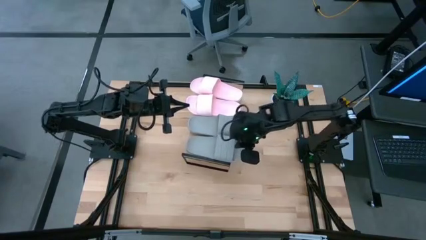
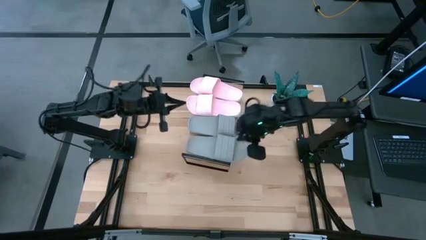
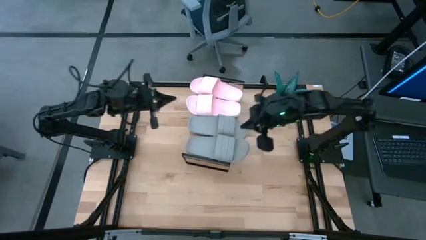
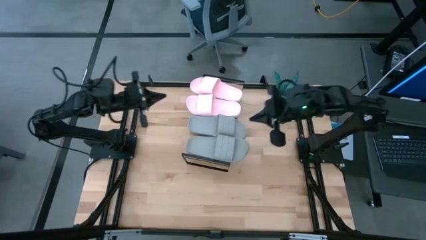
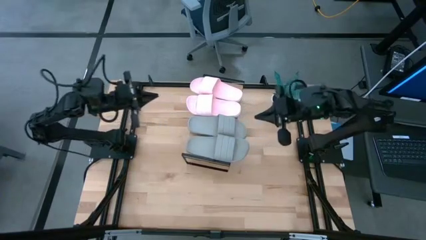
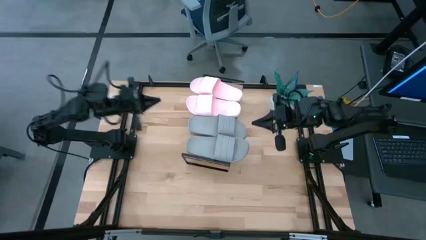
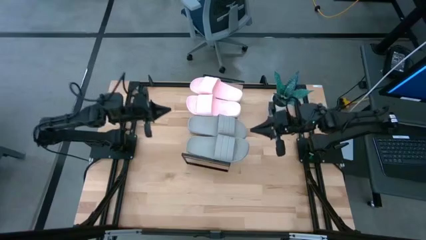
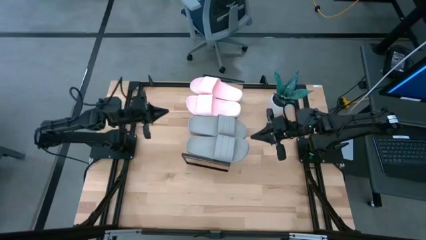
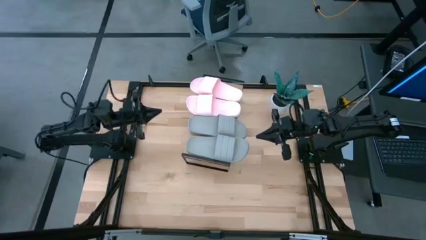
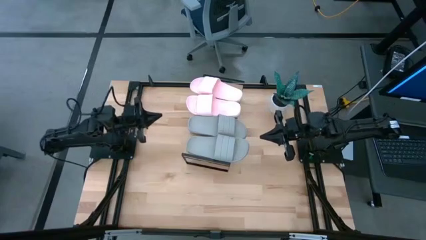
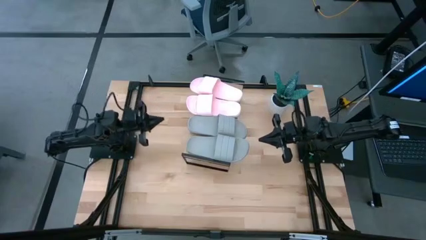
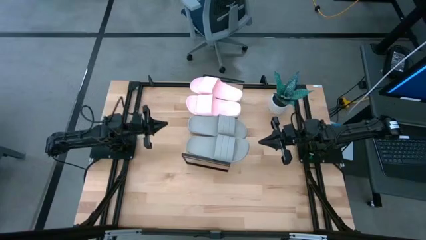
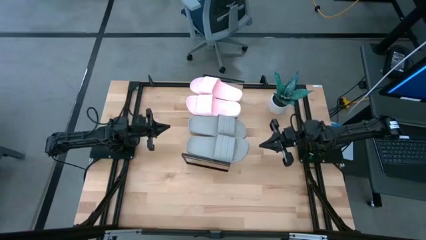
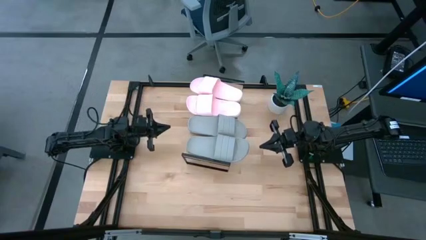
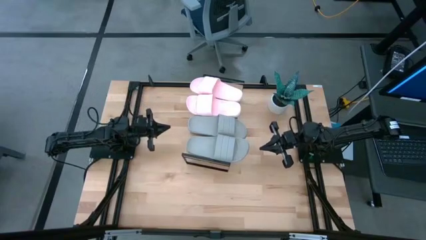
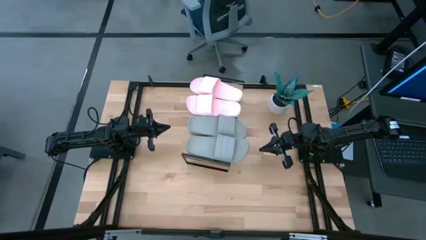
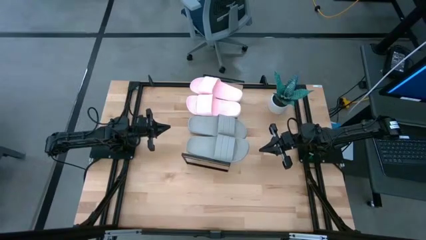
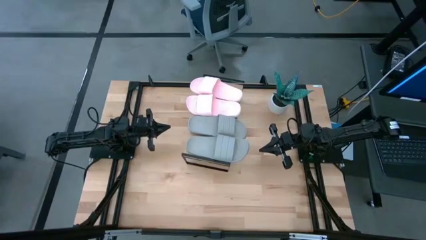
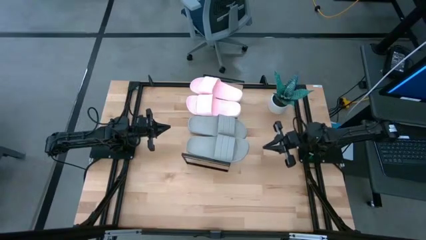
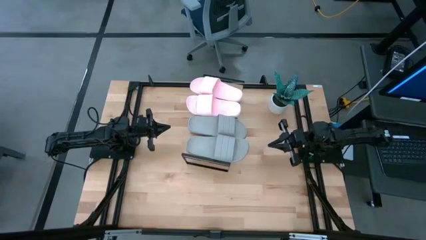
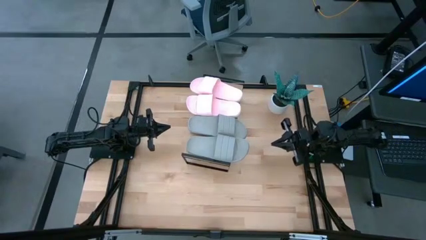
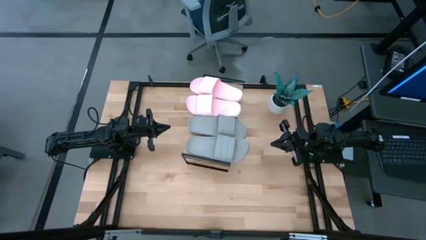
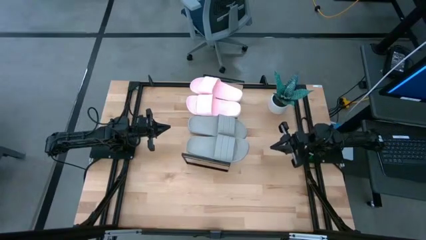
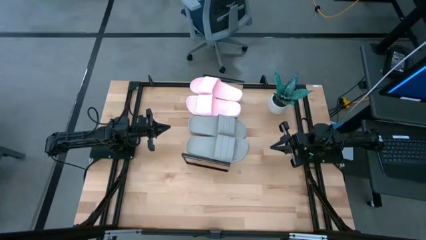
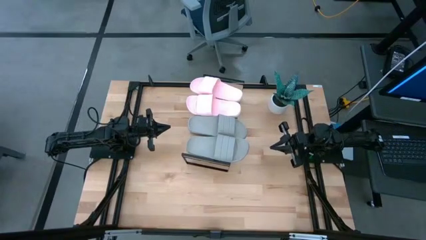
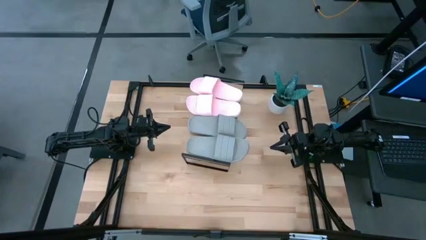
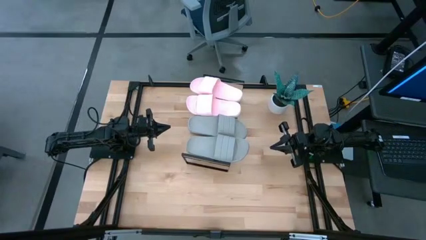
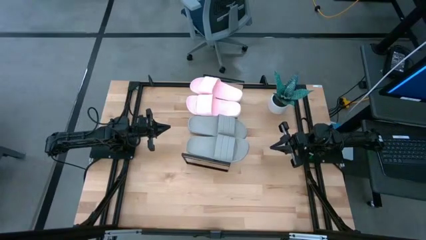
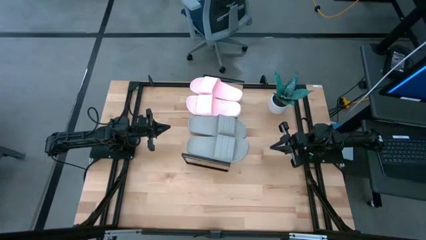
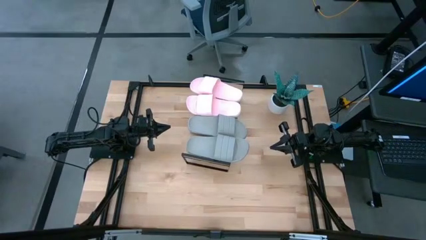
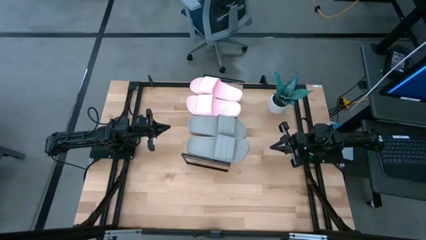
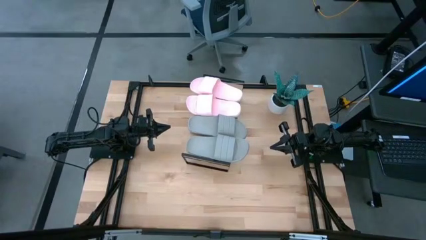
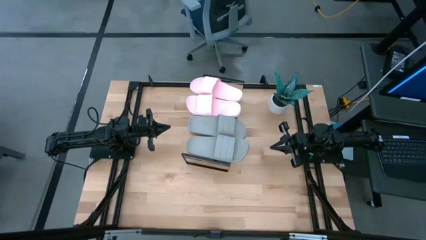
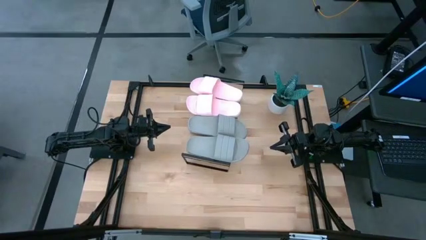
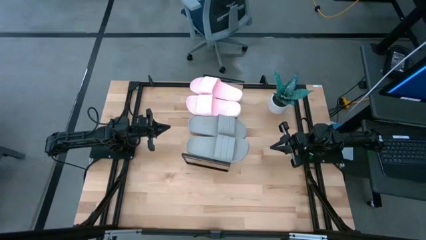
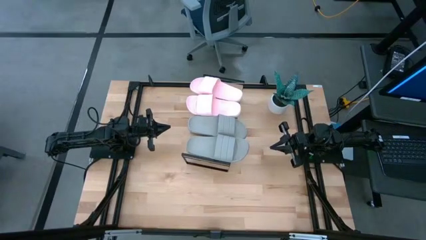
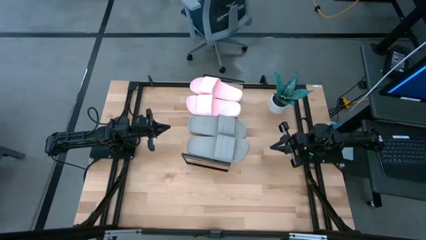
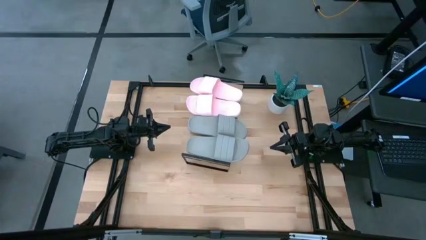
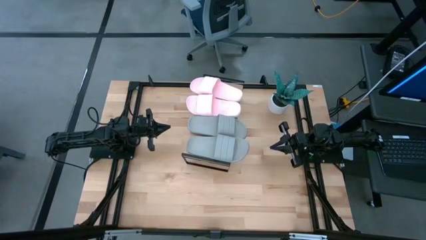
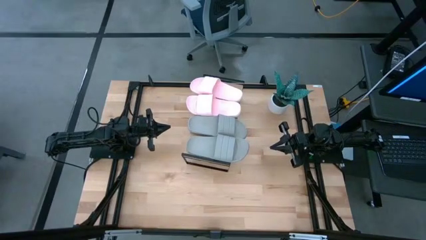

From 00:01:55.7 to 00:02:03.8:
Task: Pick and place slides into the shelf
Return to Home Position
